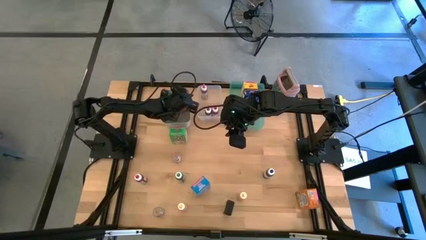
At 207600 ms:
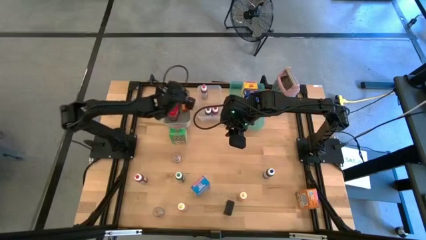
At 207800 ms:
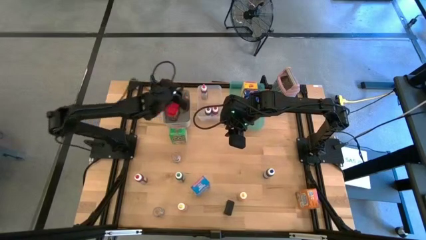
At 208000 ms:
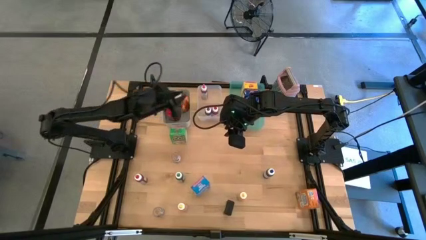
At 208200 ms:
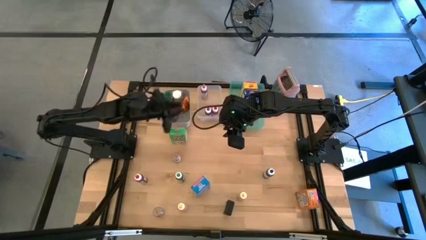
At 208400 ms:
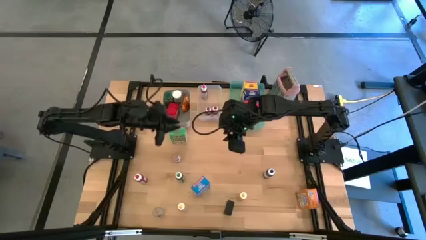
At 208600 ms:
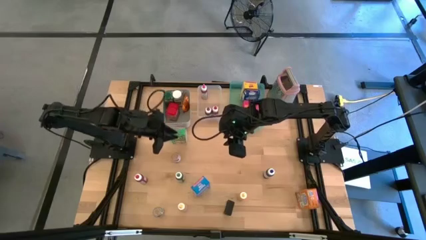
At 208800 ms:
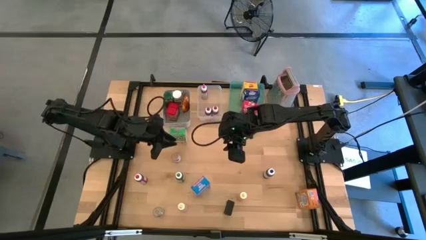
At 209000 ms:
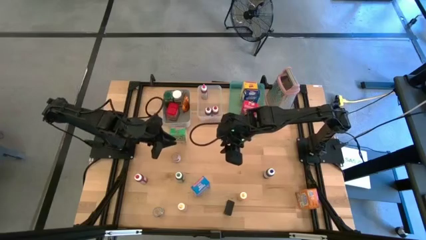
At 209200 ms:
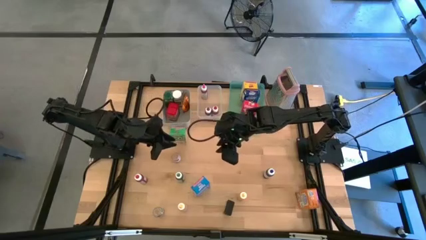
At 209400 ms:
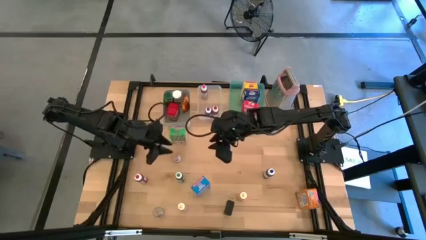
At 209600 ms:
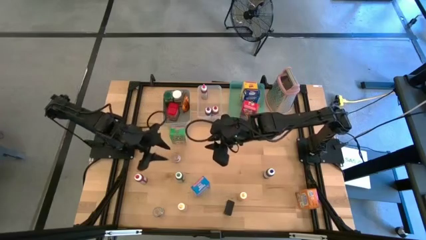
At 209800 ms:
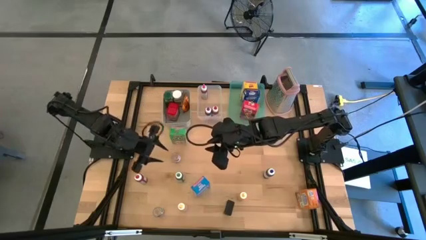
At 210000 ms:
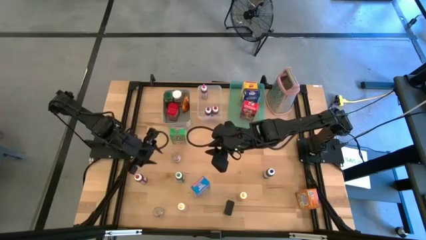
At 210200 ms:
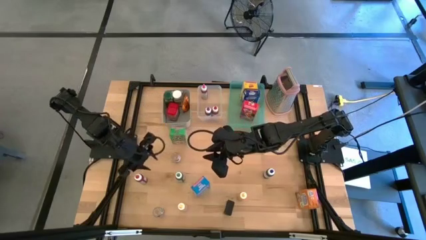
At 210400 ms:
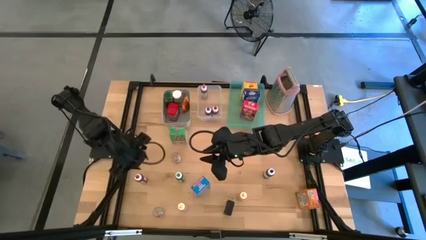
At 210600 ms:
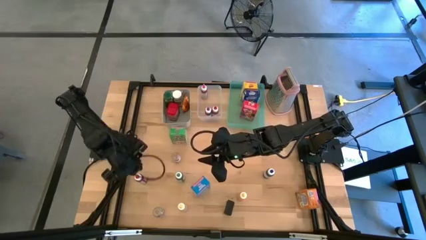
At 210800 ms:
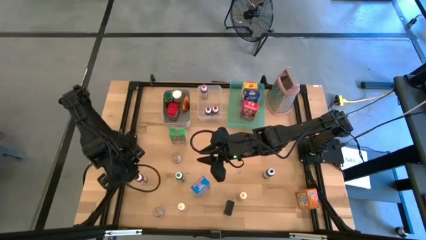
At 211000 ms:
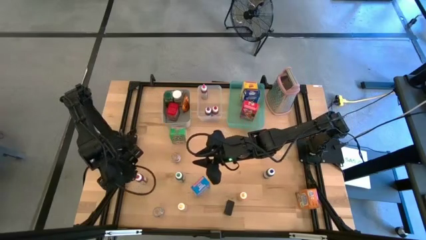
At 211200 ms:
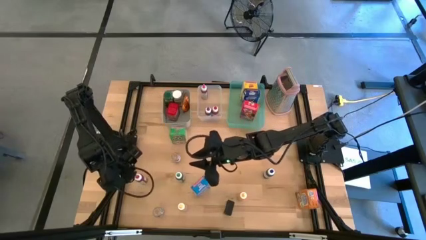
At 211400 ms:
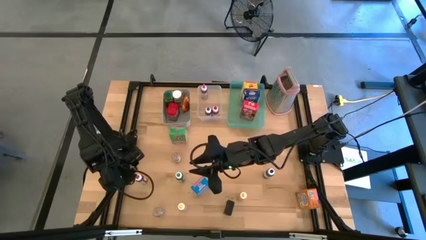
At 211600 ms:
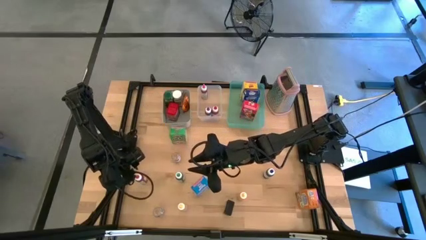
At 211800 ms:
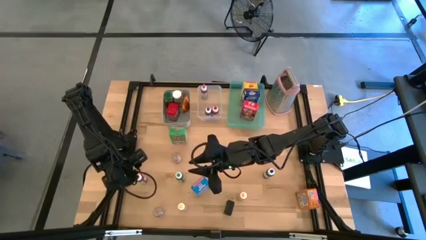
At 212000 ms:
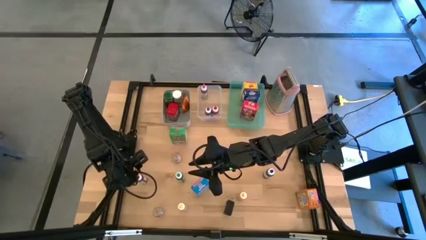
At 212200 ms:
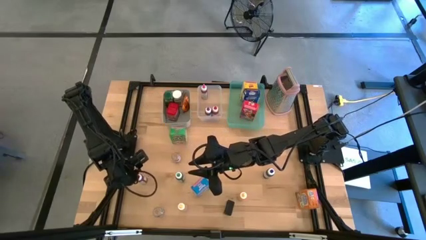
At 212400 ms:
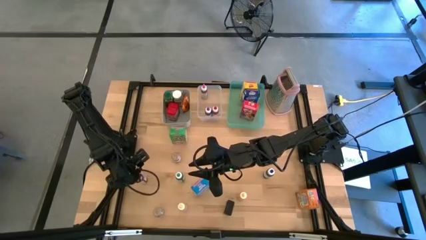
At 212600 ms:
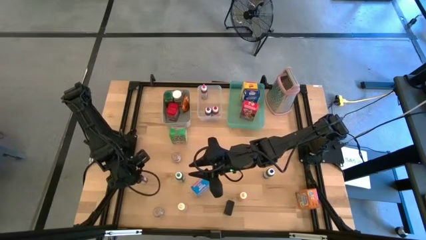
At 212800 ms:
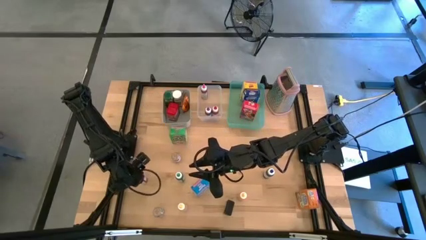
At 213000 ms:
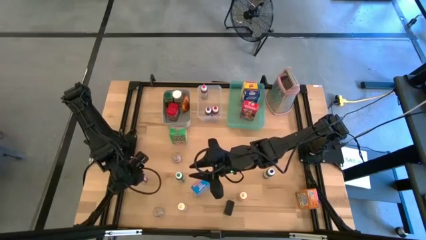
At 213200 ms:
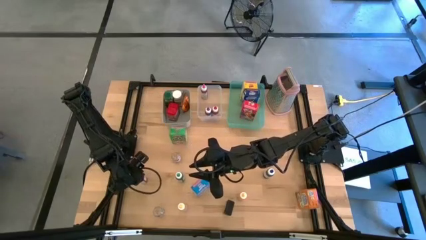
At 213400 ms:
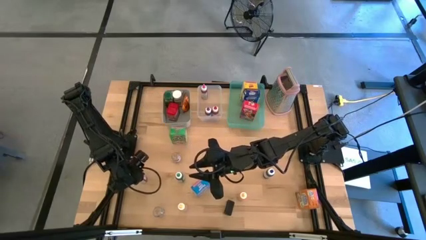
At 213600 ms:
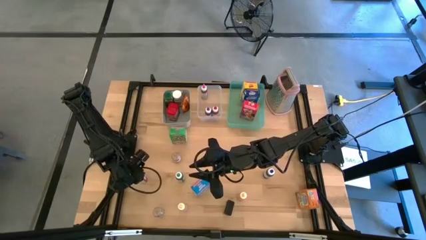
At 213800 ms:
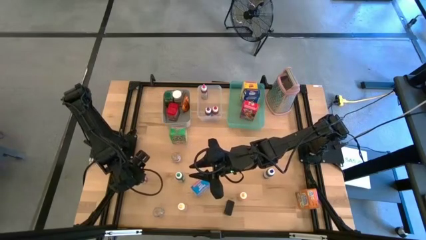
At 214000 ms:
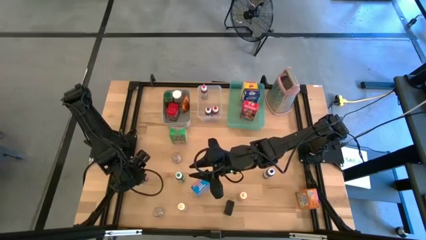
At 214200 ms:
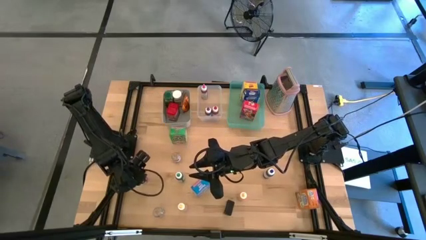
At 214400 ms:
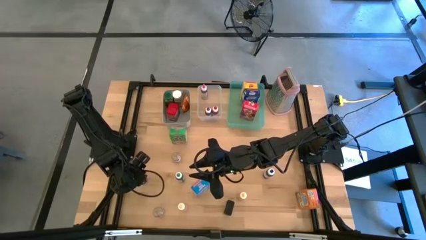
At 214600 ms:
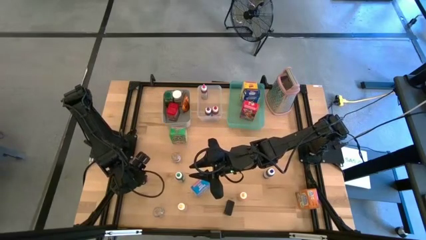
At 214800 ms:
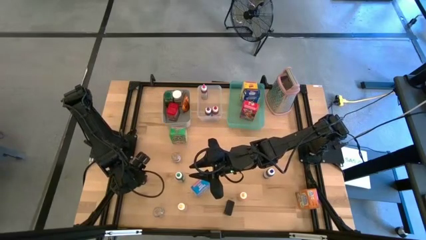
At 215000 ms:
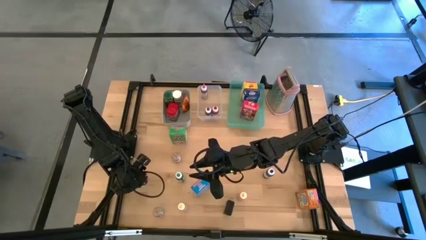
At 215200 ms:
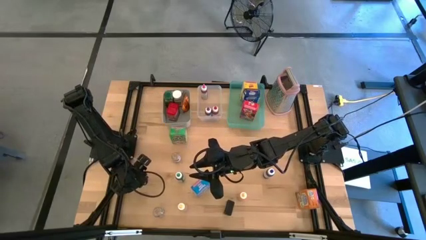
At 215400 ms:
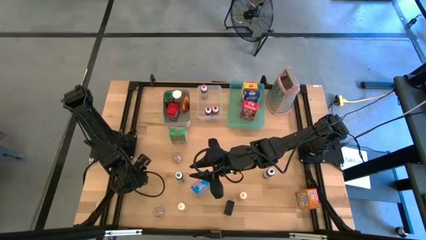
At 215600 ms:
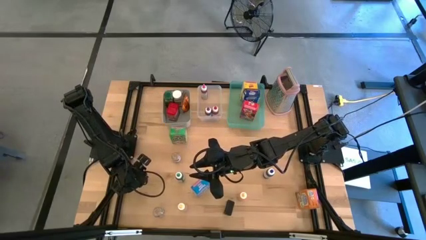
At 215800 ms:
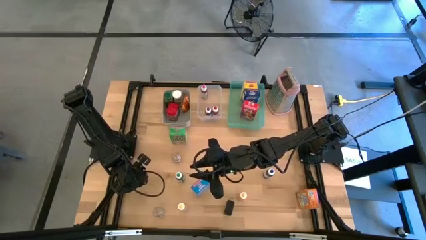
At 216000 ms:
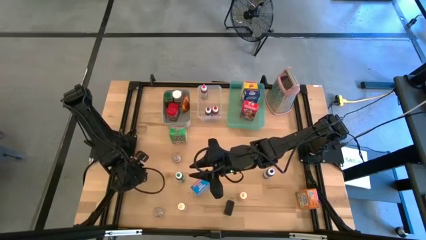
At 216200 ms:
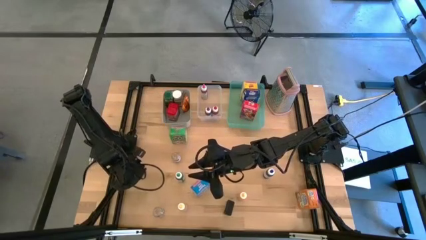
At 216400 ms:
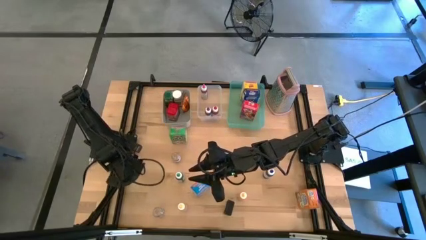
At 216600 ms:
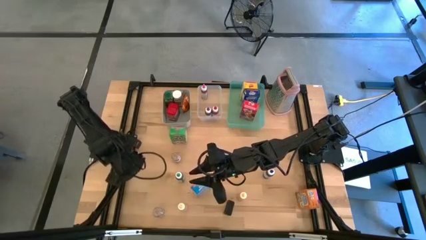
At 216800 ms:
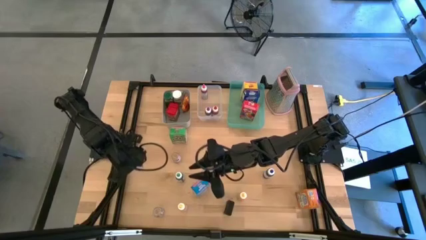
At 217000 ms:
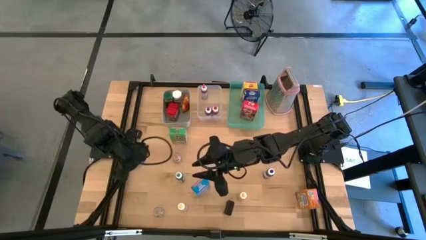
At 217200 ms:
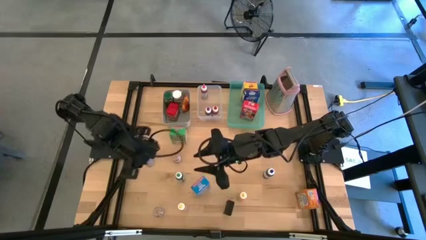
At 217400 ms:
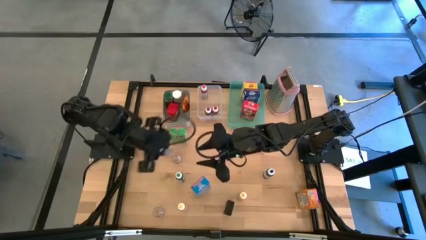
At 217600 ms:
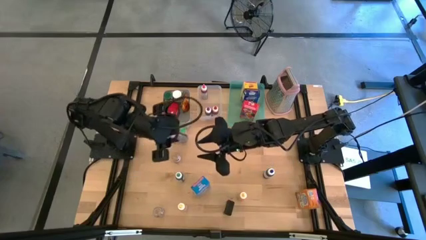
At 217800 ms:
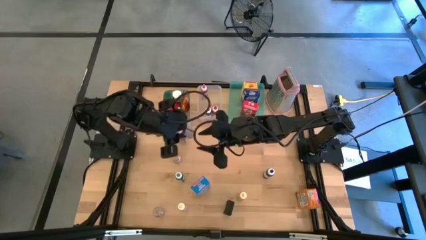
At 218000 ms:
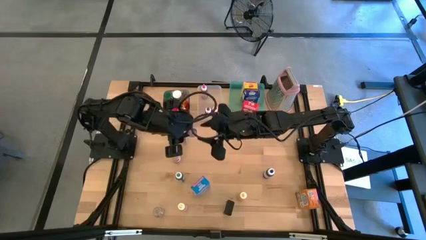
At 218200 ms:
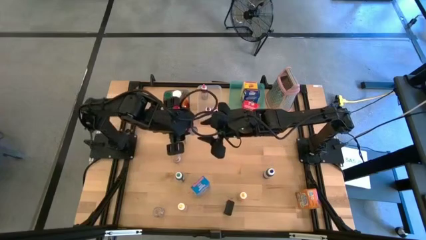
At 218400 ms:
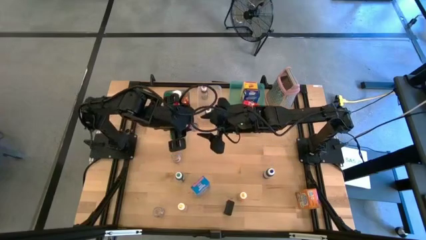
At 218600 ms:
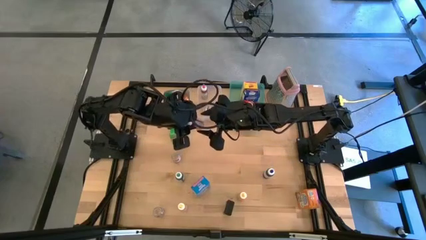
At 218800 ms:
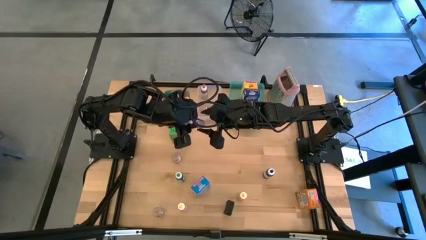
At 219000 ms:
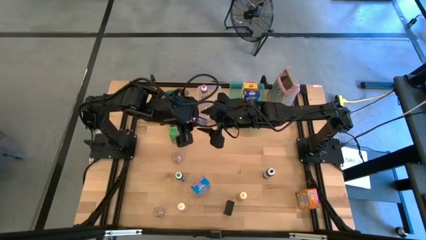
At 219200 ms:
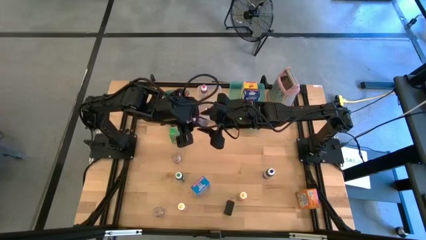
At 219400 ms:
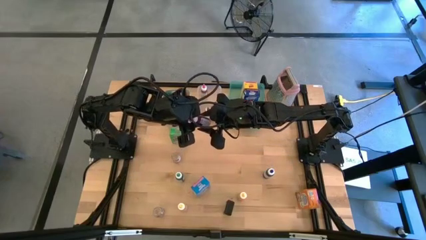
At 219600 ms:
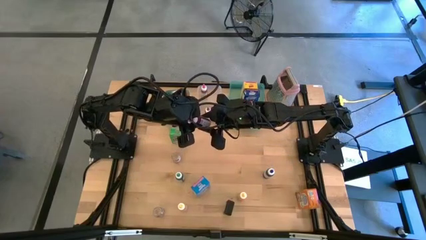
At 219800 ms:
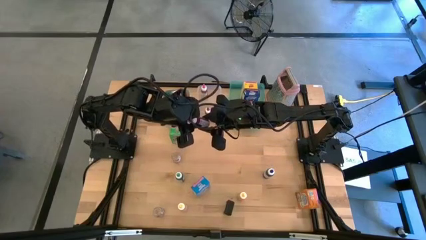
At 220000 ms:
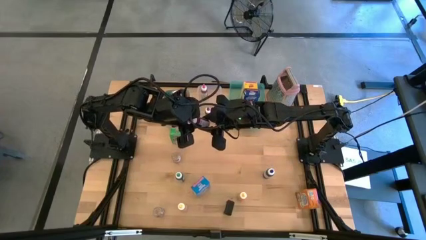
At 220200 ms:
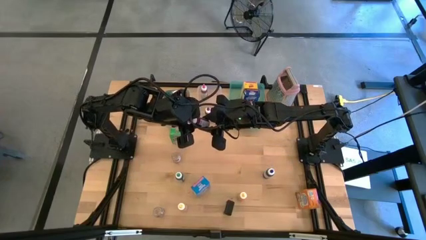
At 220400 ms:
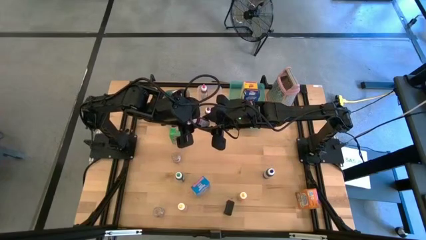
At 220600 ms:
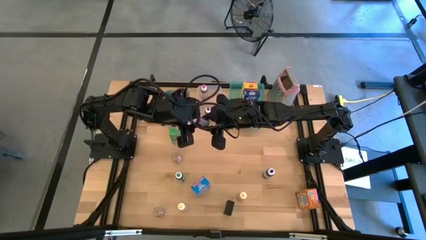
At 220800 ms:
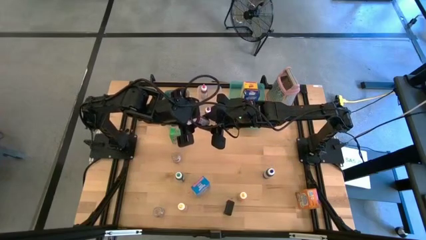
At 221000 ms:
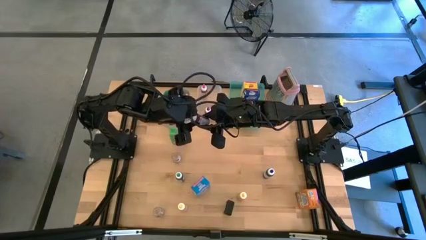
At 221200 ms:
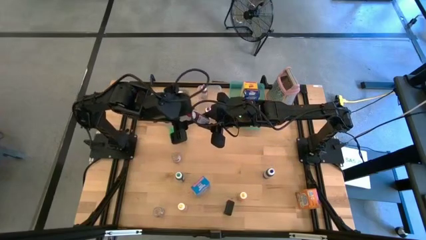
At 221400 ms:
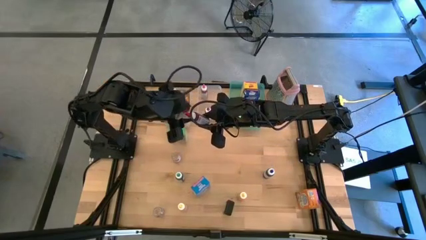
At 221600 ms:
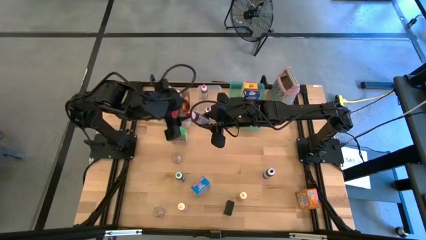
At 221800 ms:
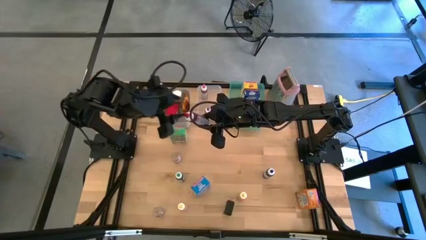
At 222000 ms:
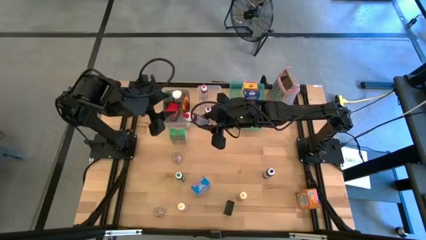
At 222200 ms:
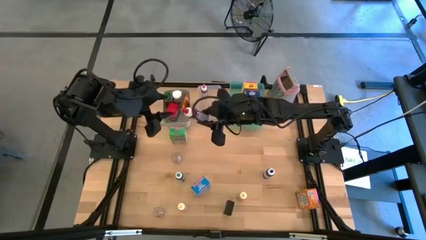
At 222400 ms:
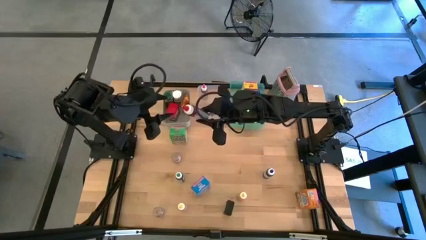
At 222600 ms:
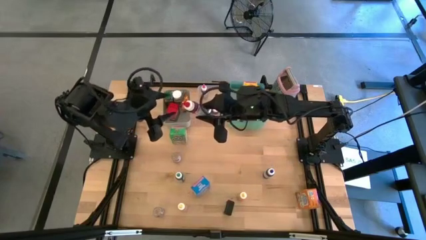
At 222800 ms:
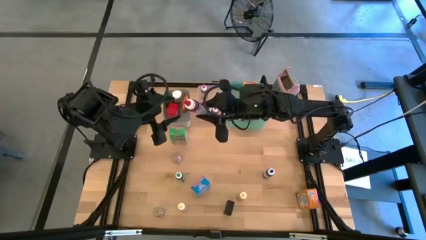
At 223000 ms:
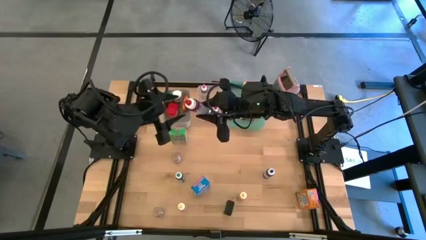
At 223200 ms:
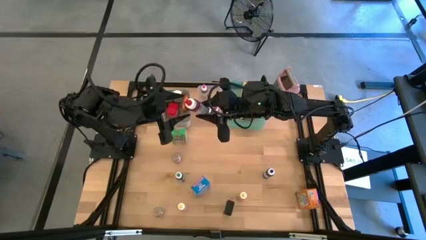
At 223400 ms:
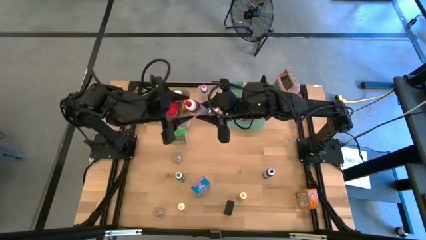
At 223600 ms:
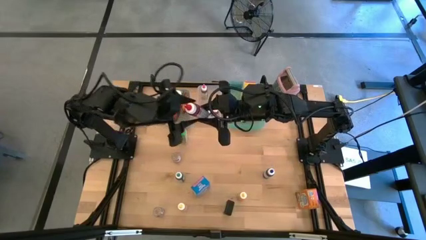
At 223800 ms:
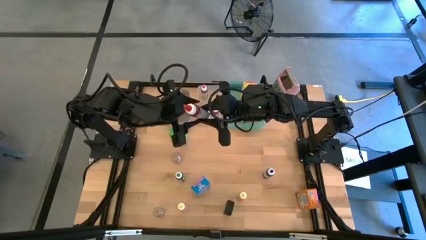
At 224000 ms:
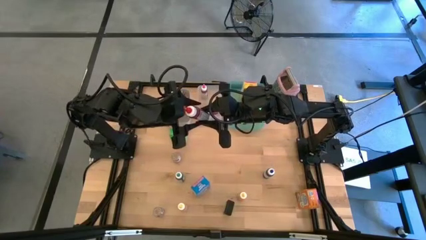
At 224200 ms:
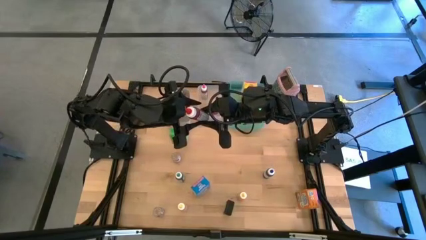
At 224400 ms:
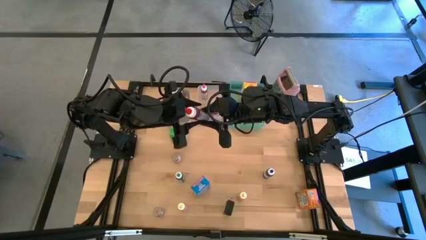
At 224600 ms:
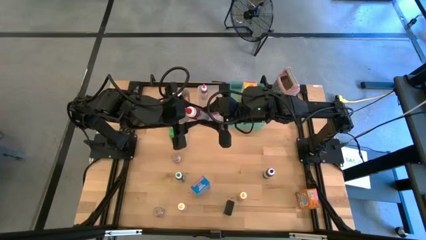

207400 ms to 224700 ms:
Task: Pick & Place Kitchen Items
Put the red food coloring bottle into the transparent bin
